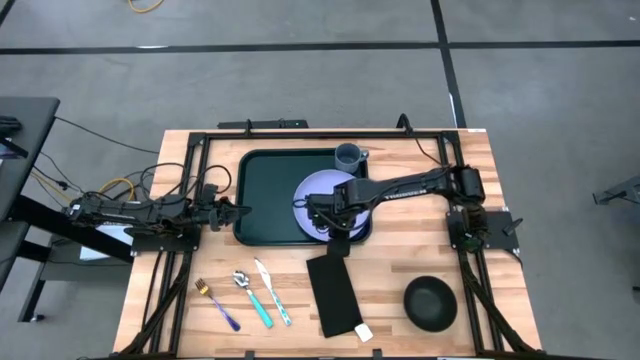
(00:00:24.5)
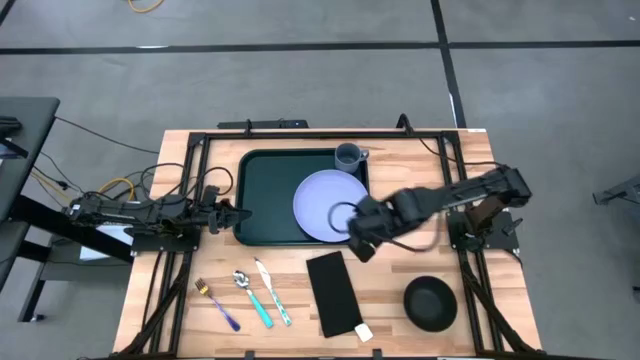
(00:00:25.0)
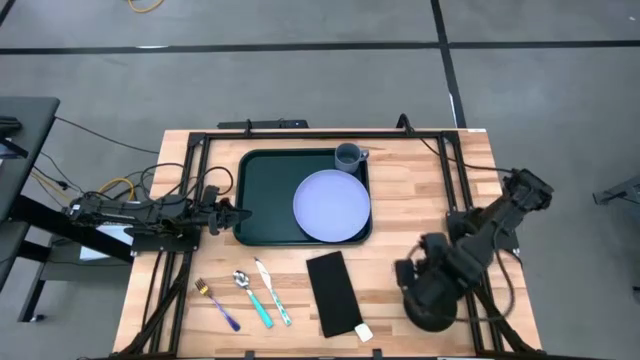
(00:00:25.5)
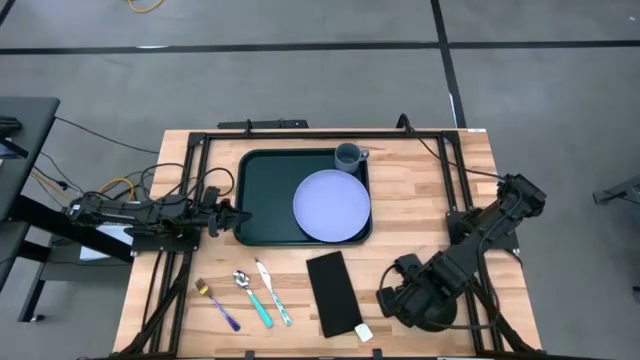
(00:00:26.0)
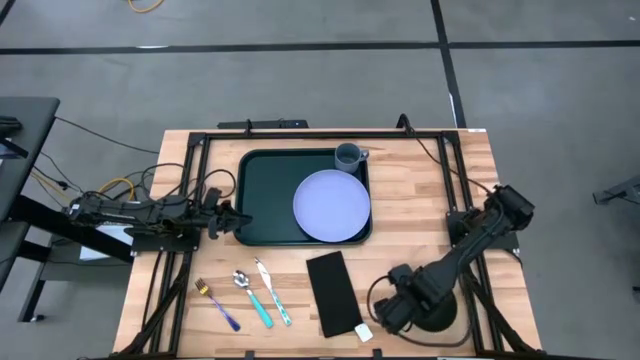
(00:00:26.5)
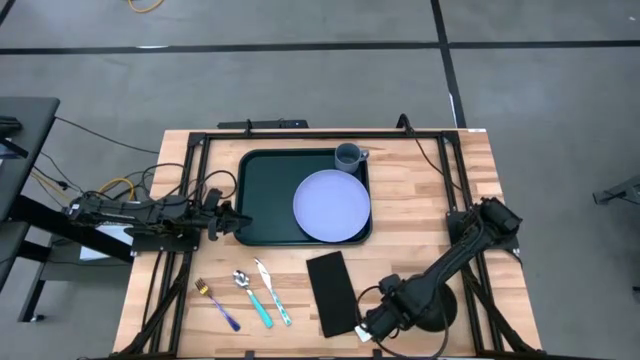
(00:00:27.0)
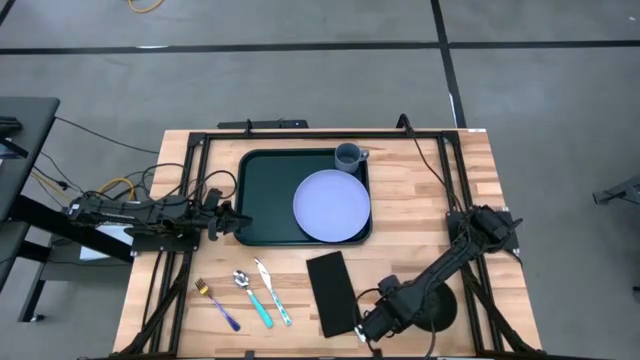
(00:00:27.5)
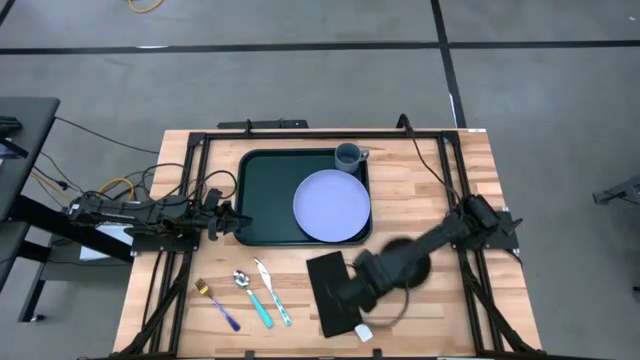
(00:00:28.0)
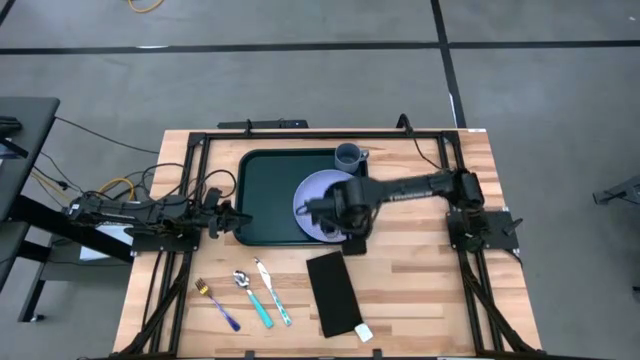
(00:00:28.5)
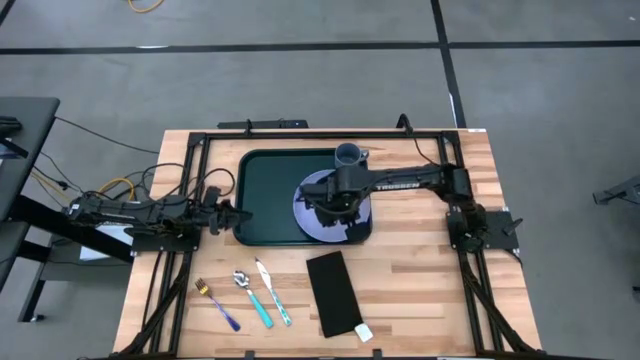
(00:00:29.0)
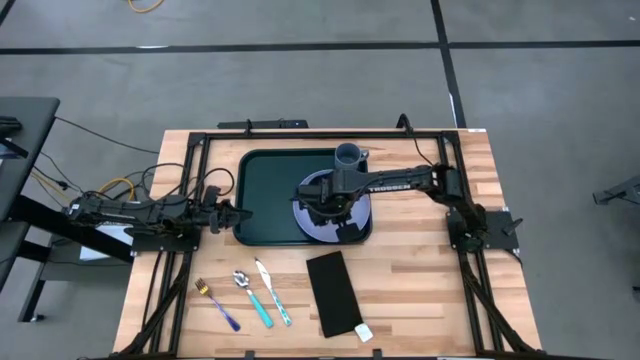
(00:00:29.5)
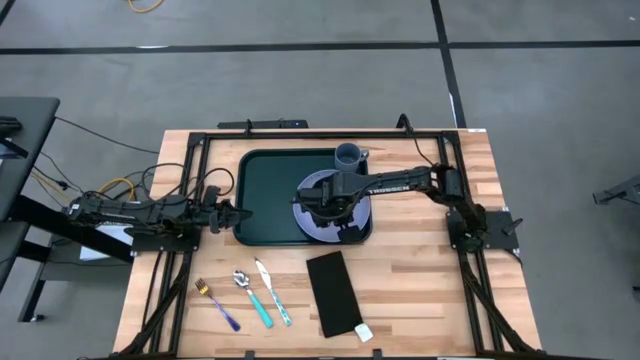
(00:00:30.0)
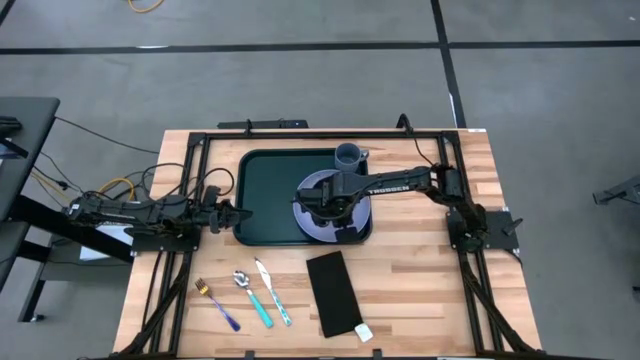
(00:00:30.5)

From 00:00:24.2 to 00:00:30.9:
Task: Set up tray
Put the black bowl on the violet plate

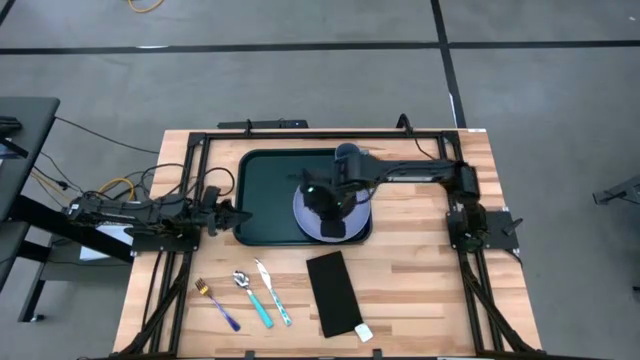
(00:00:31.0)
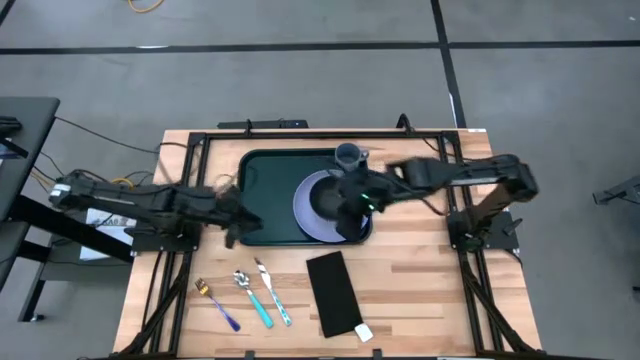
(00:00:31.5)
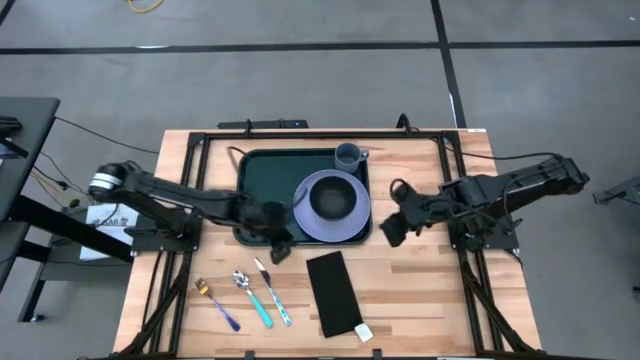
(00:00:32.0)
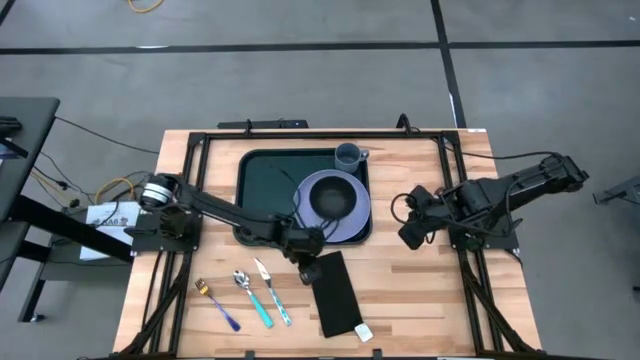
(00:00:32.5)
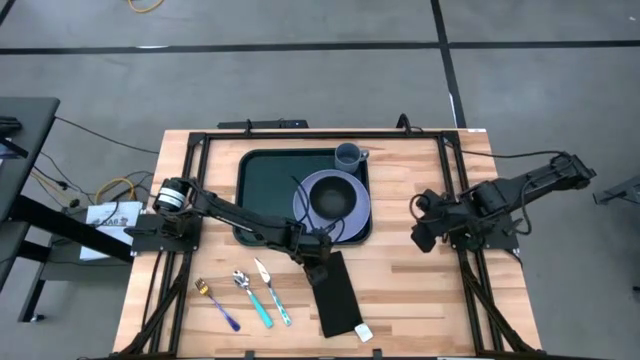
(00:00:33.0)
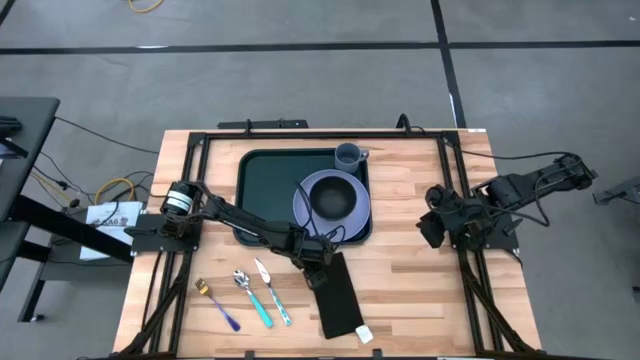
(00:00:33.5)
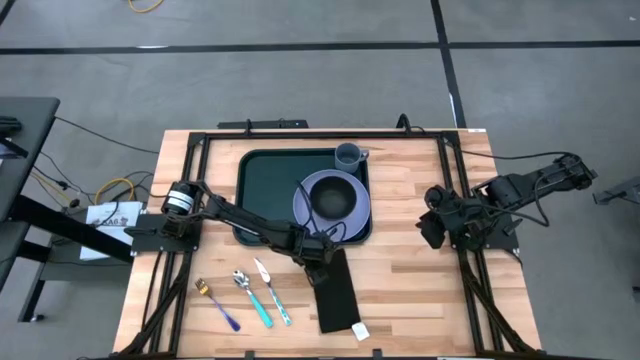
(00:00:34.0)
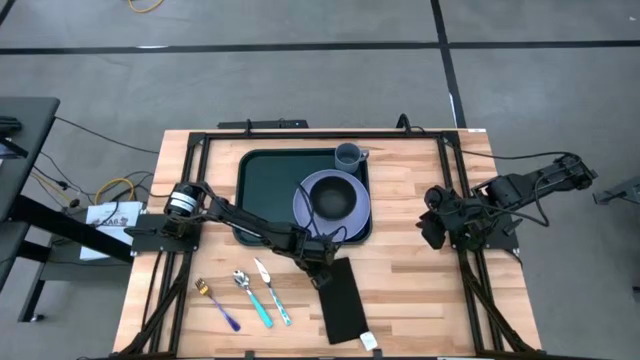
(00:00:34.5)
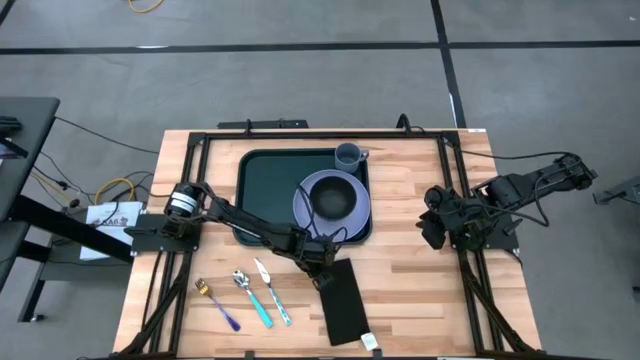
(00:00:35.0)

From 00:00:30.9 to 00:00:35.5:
Put the black table napkin on the black tray to the left of the violet plate

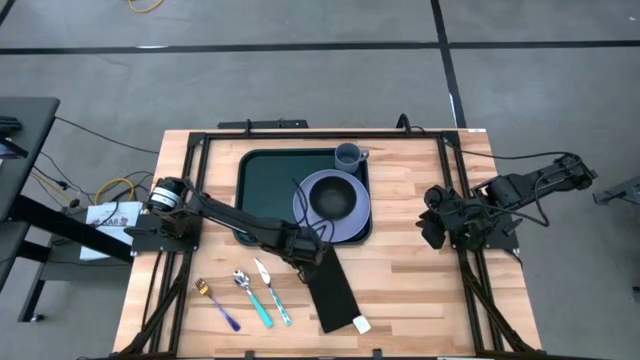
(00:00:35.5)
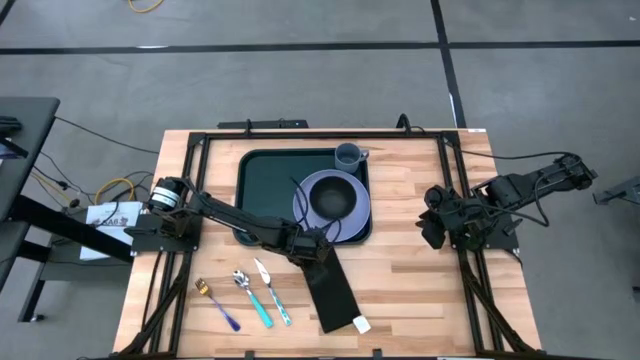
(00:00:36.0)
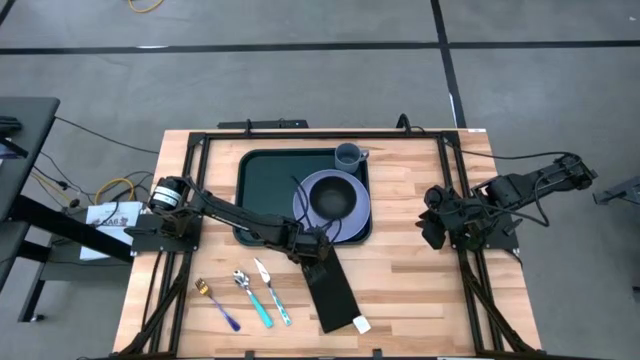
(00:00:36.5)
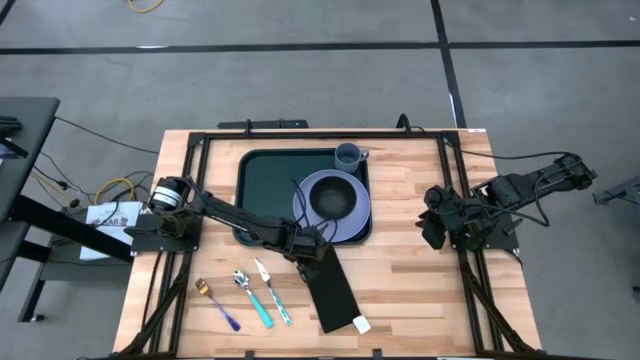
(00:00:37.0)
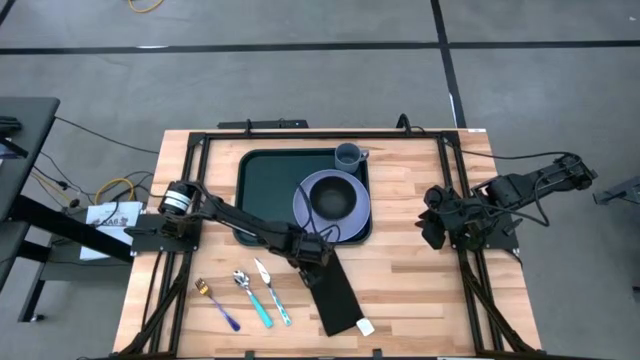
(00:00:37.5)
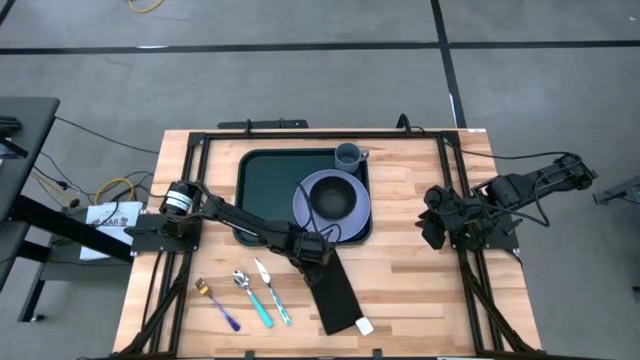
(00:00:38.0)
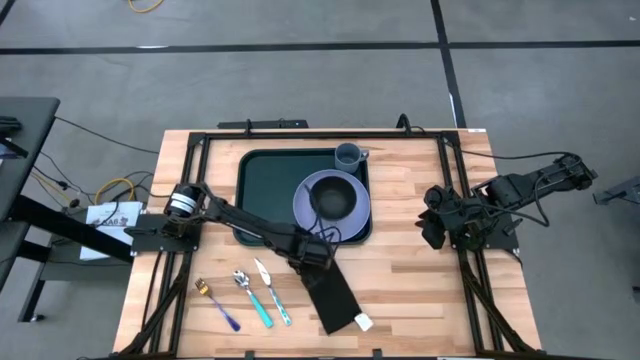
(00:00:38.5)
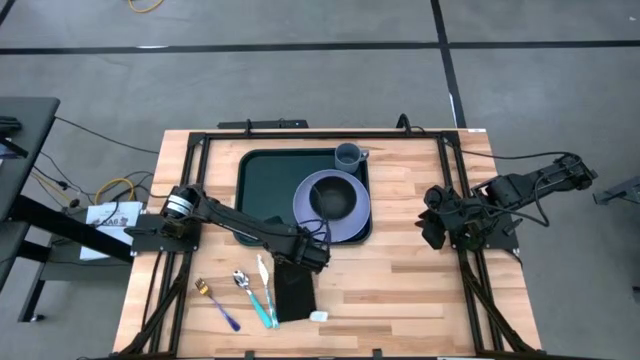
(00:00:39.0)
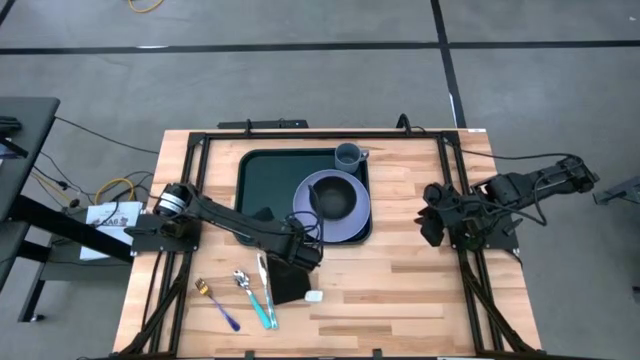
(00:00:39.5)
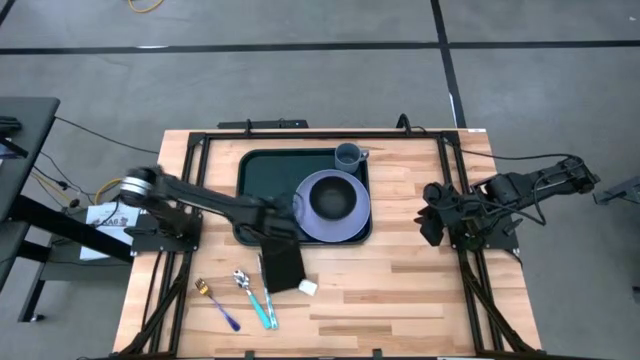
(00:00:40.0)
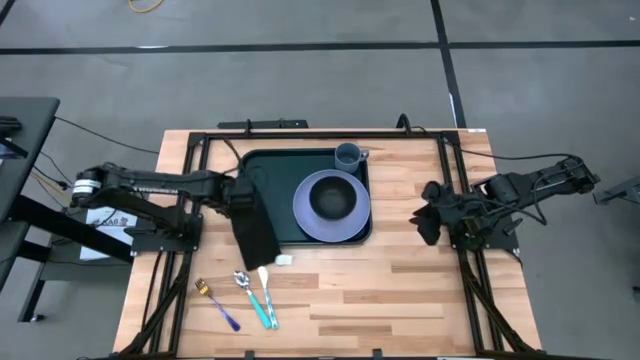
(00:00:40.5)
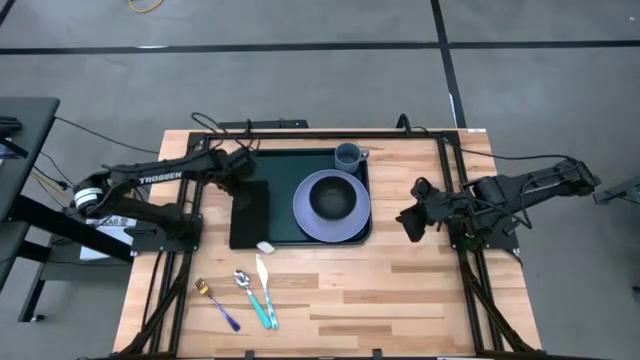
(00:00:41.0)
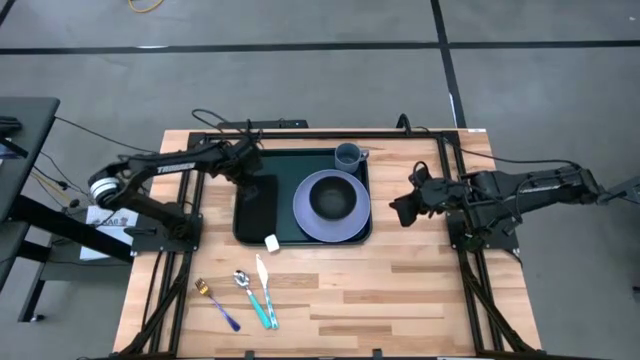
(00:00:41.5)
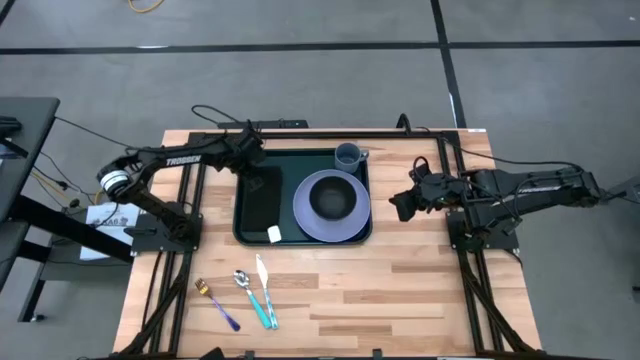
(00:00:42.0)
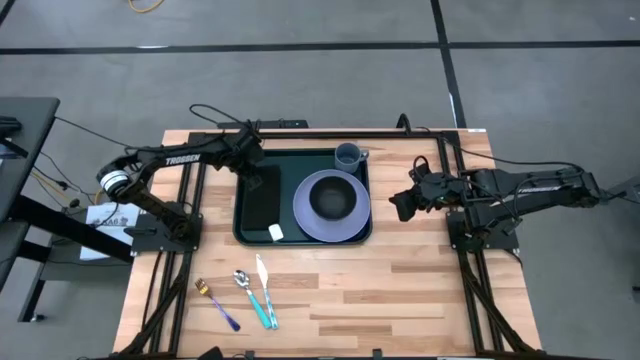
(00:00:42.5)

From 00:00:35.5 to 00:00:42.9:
Put the black table napkin on the black tray to the left of the violet plate

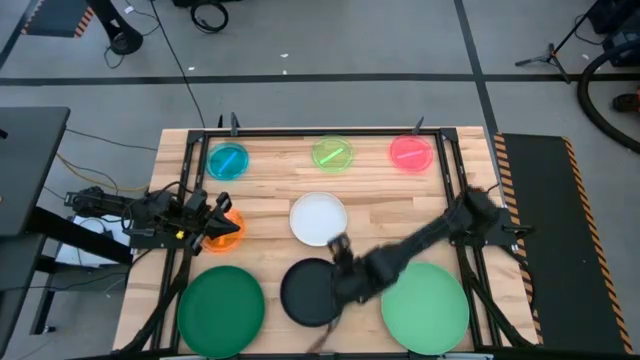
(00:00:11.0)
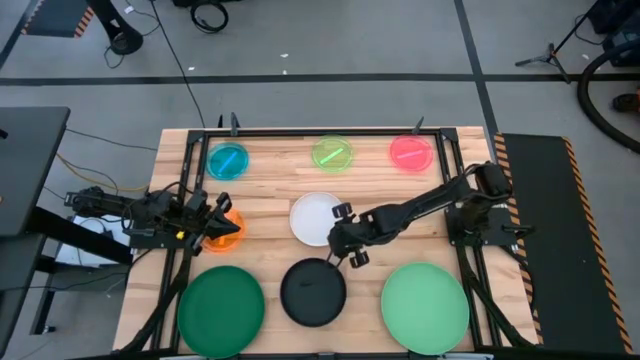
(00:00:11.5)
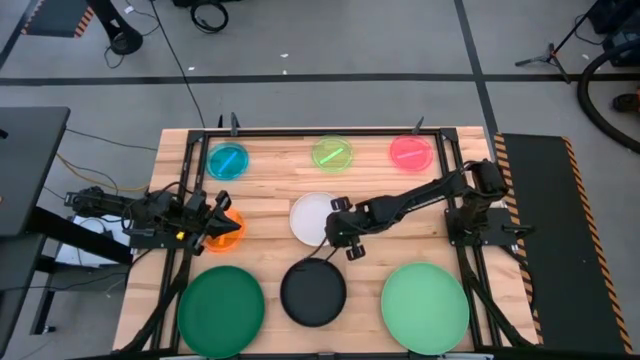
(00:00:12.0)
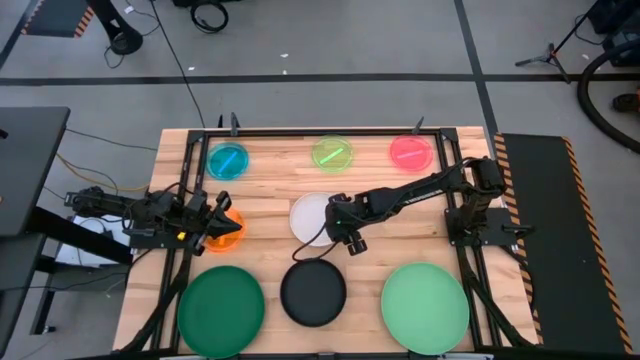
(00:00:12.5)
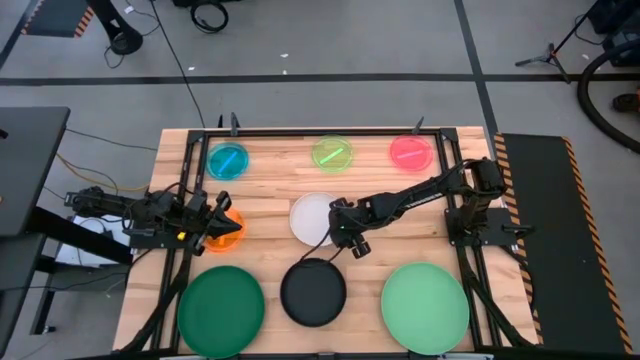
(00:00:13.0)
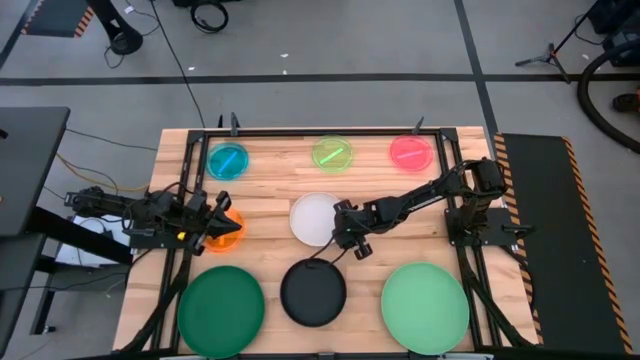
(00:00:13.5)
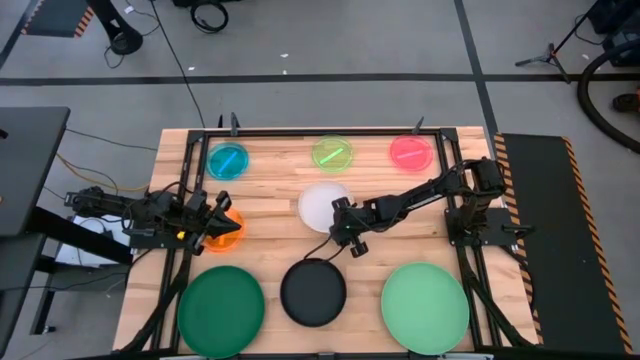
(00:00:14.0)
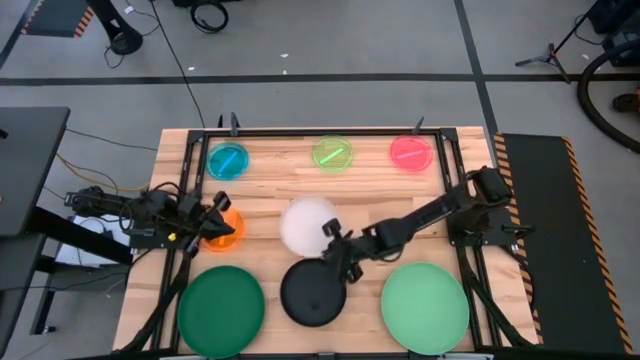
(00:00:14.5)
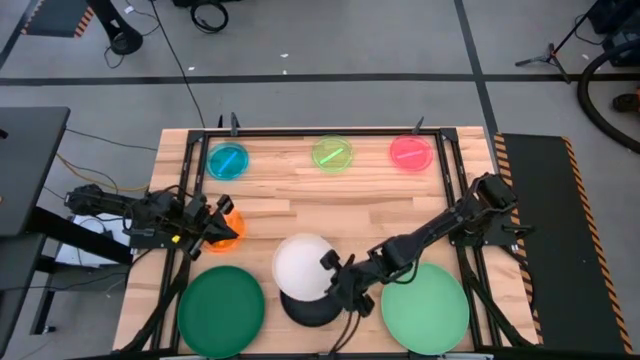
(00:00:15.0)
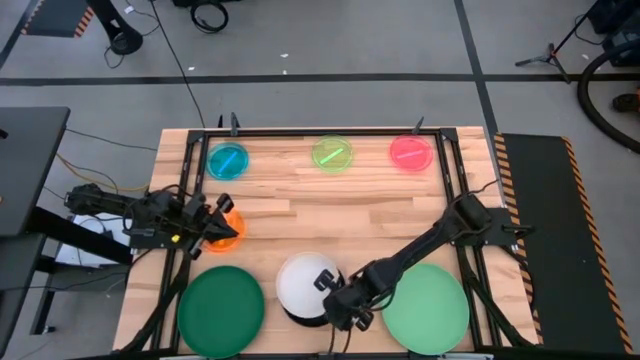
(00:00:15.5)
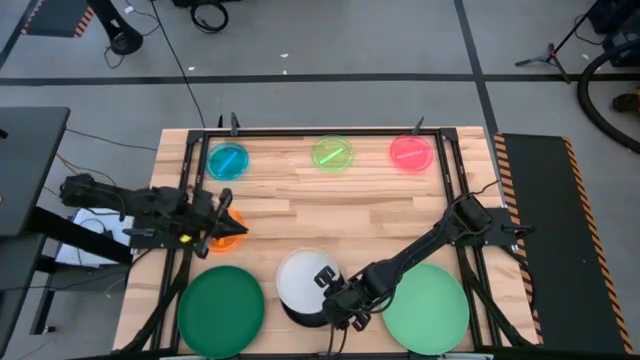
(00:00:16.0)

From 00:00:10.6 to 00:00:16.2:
Task: Stack plastic plates
Stack the white plate on top of the black plate
